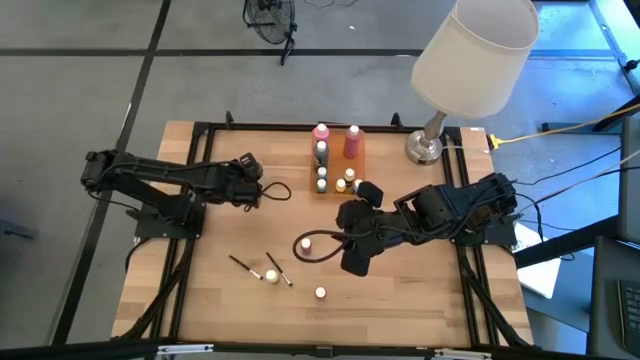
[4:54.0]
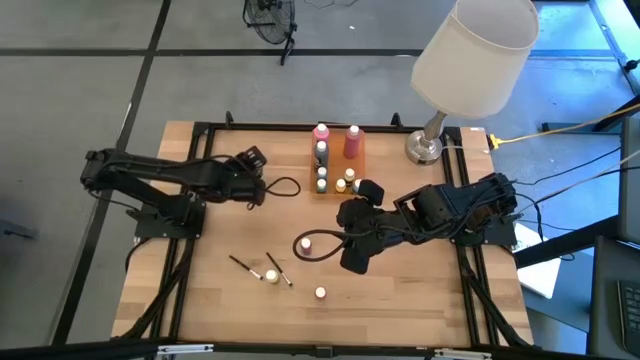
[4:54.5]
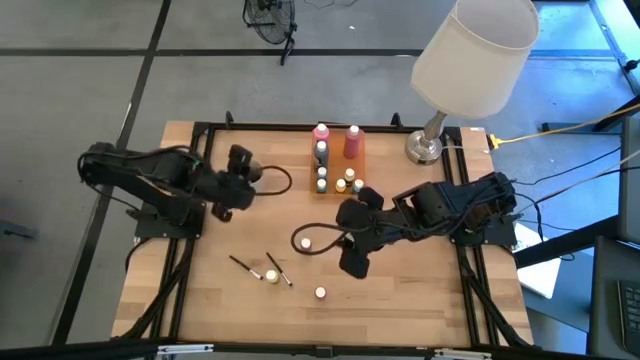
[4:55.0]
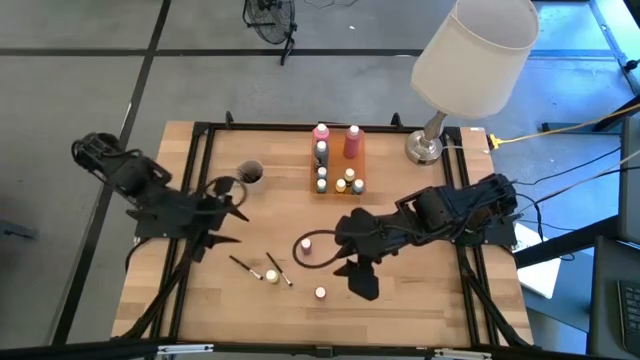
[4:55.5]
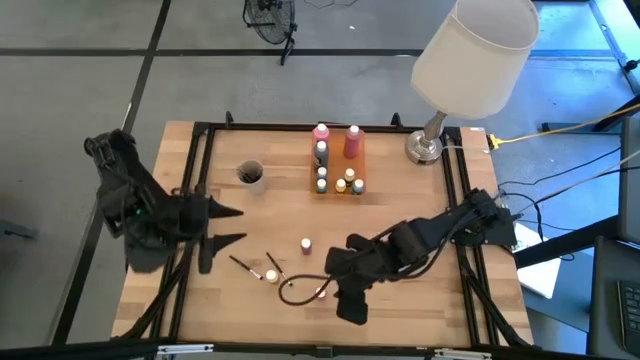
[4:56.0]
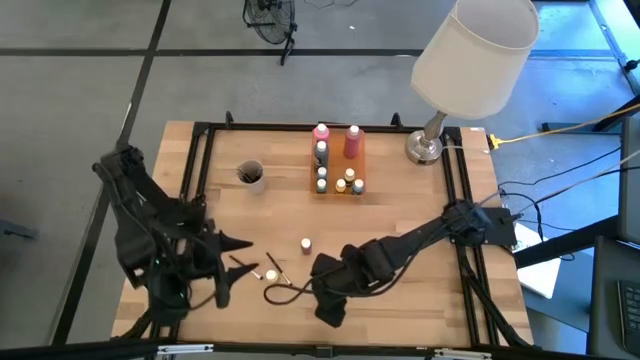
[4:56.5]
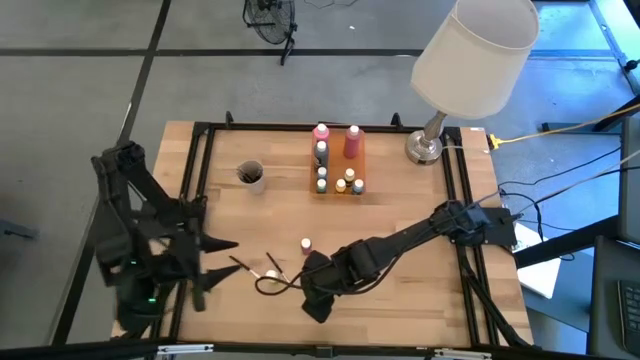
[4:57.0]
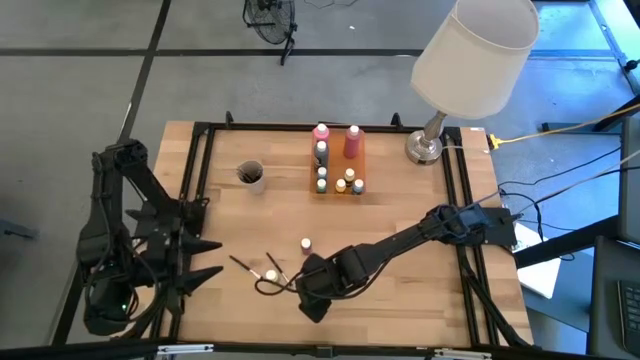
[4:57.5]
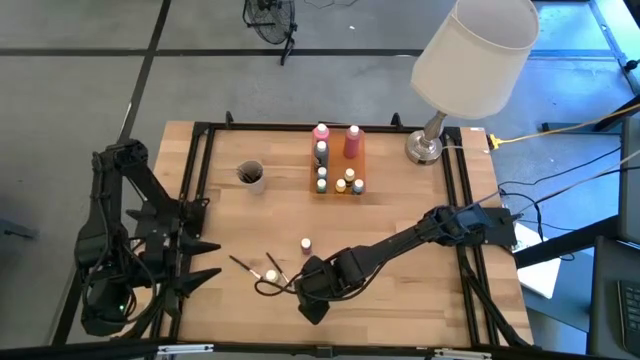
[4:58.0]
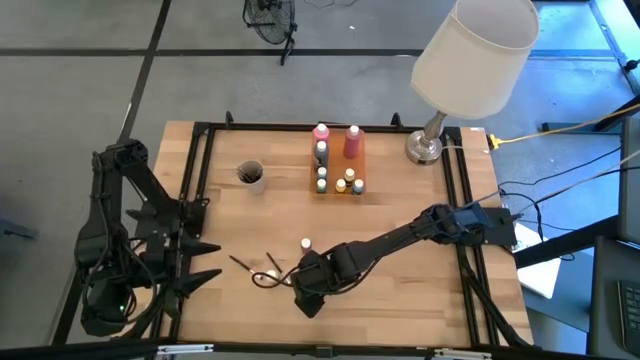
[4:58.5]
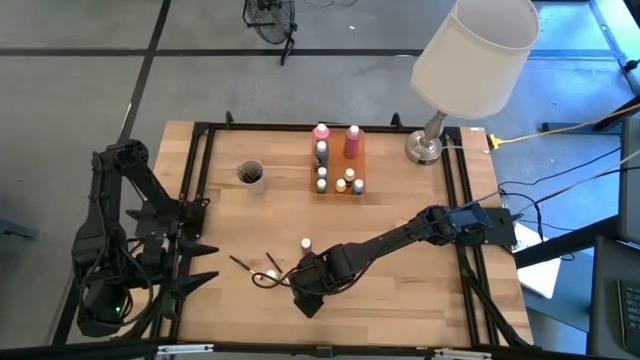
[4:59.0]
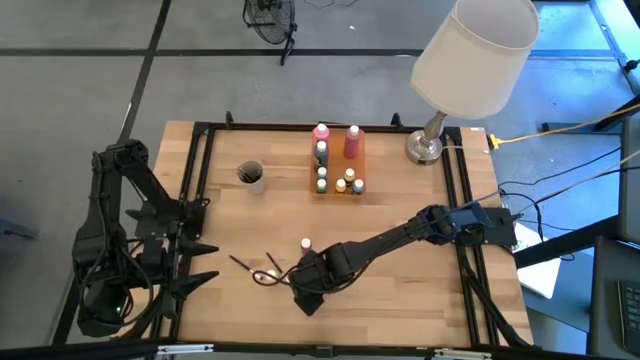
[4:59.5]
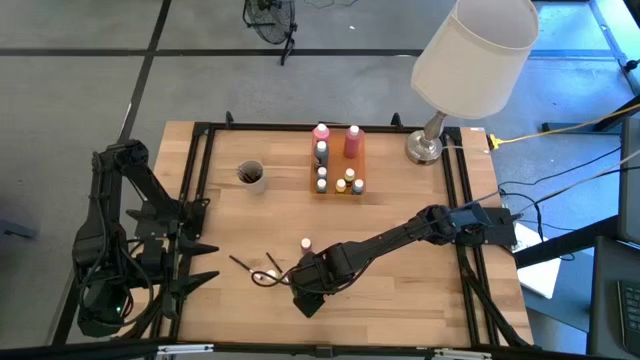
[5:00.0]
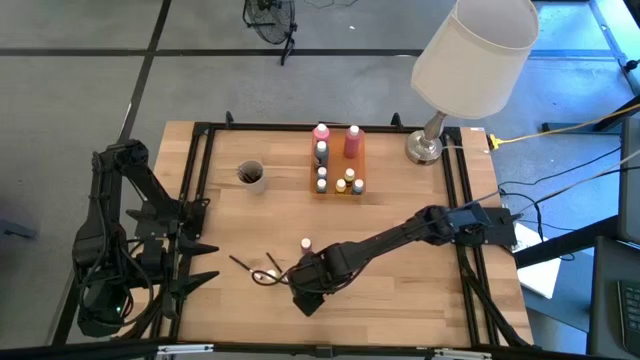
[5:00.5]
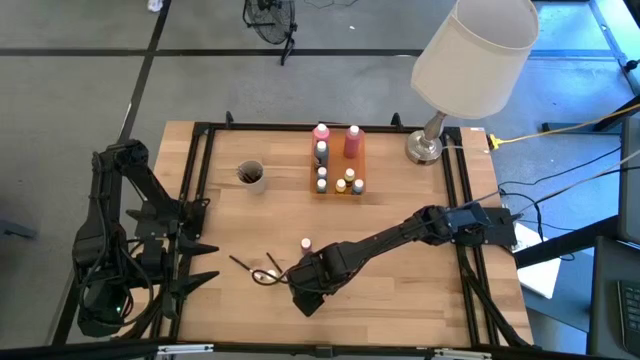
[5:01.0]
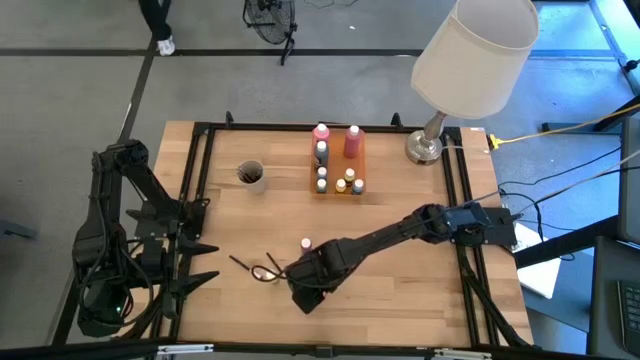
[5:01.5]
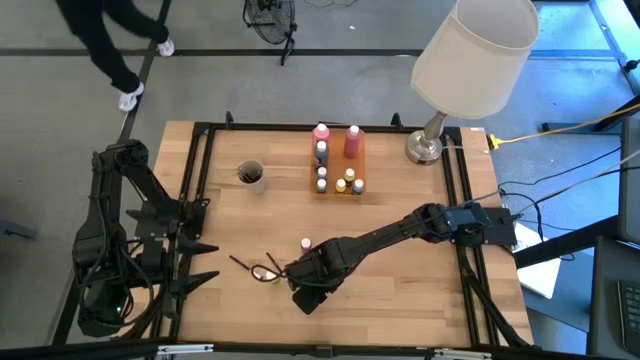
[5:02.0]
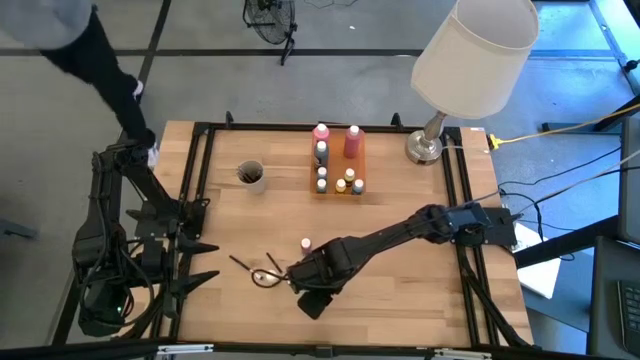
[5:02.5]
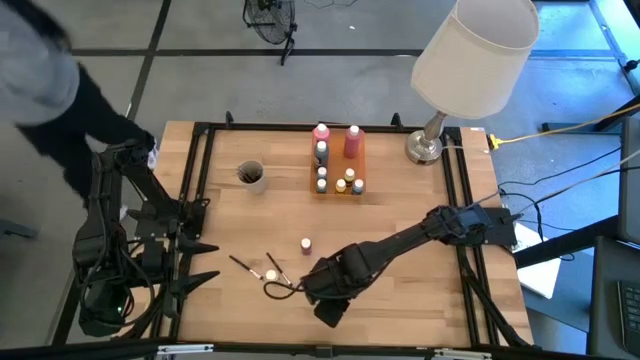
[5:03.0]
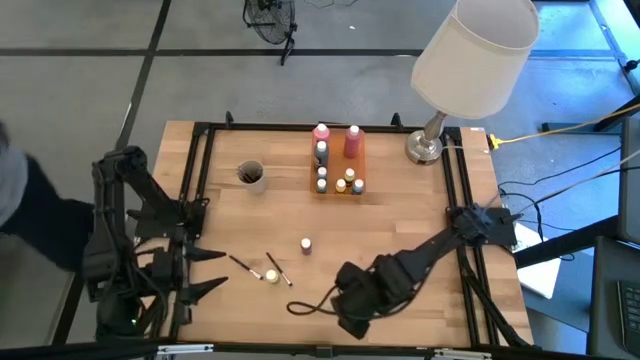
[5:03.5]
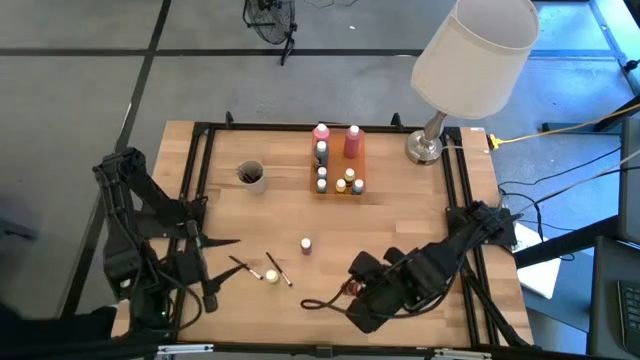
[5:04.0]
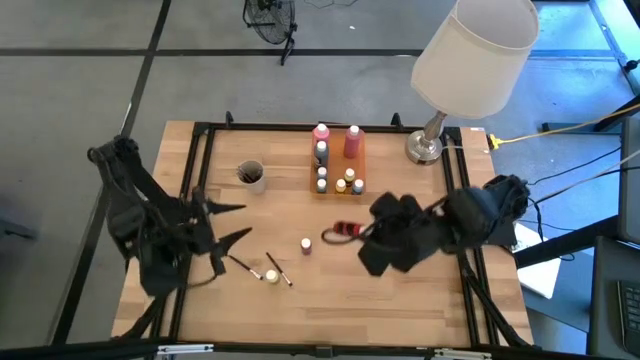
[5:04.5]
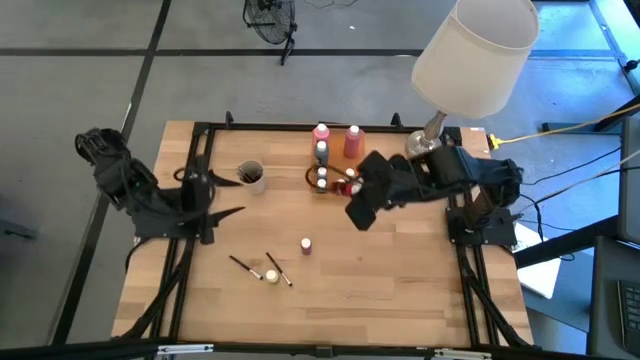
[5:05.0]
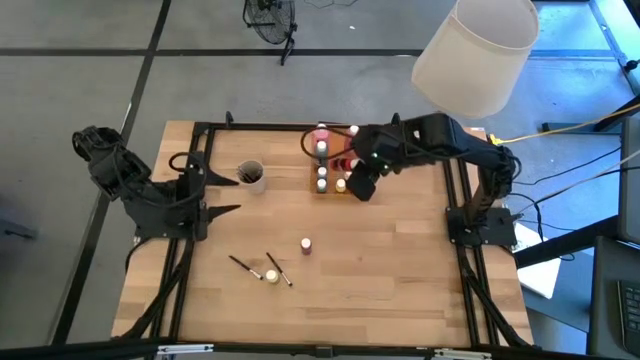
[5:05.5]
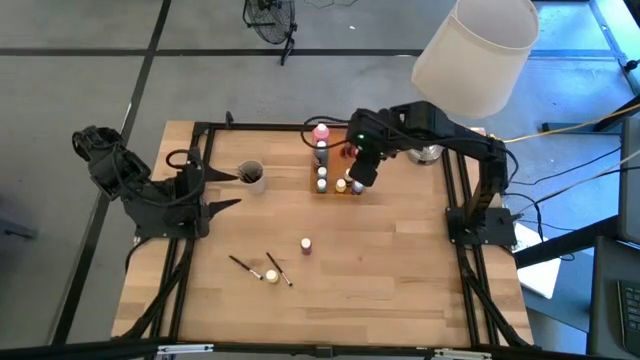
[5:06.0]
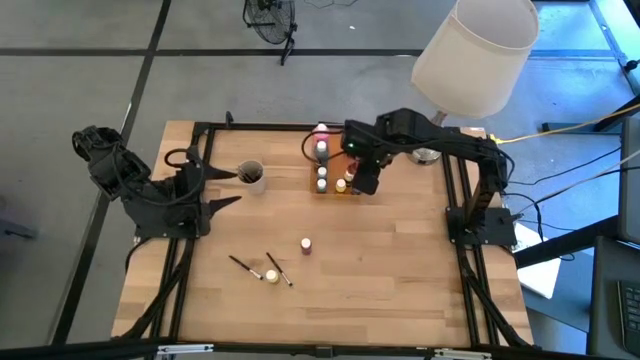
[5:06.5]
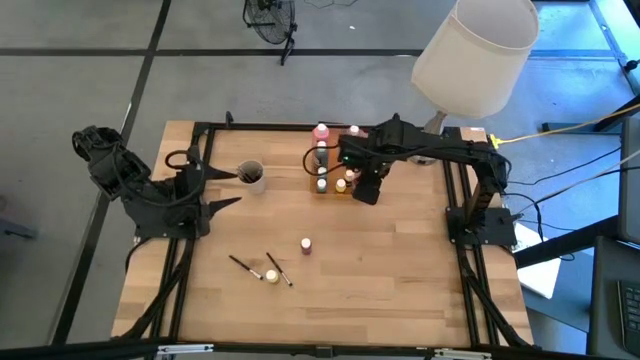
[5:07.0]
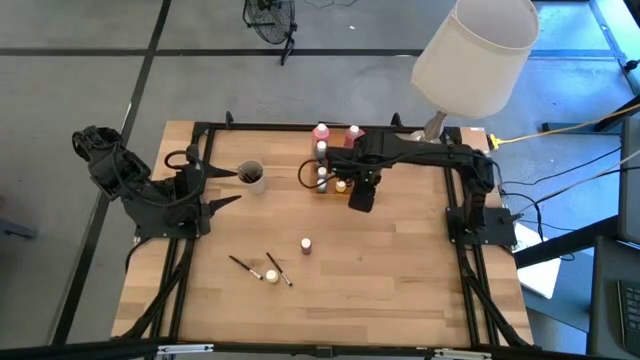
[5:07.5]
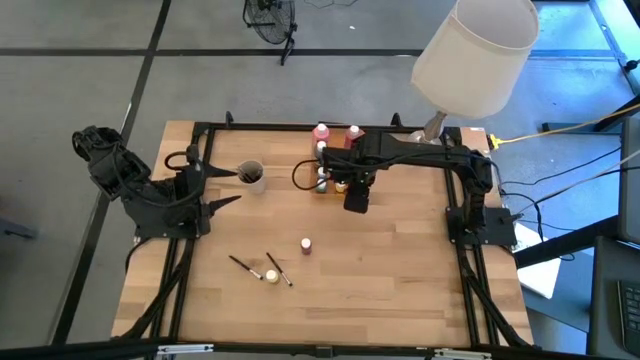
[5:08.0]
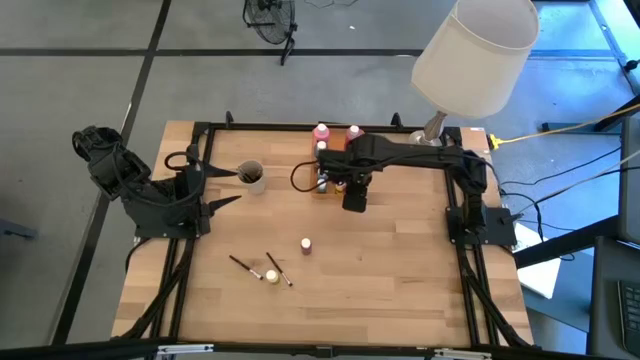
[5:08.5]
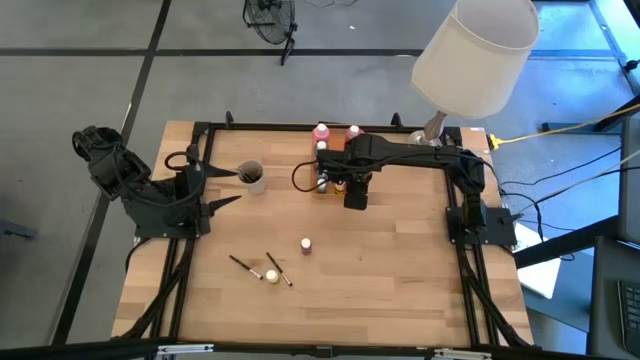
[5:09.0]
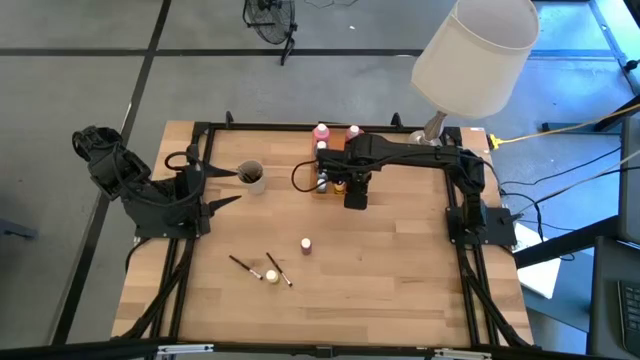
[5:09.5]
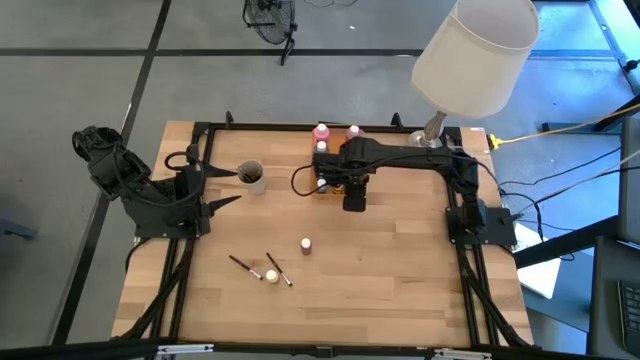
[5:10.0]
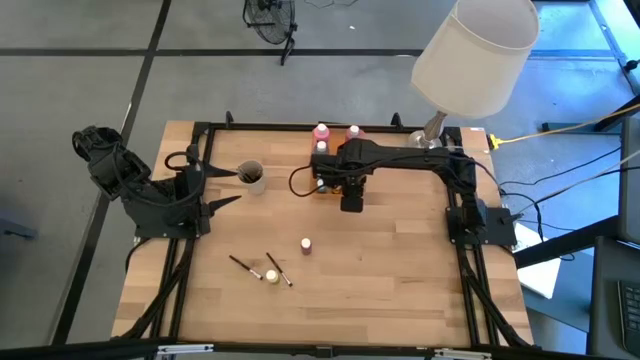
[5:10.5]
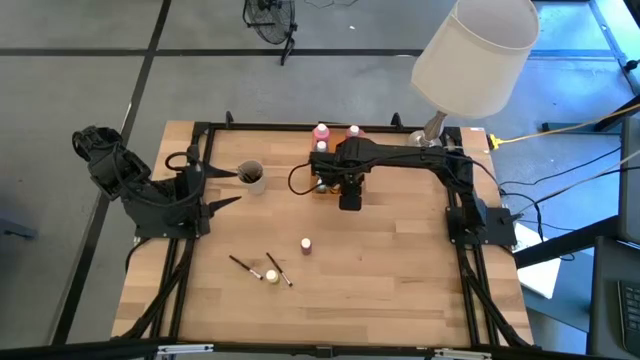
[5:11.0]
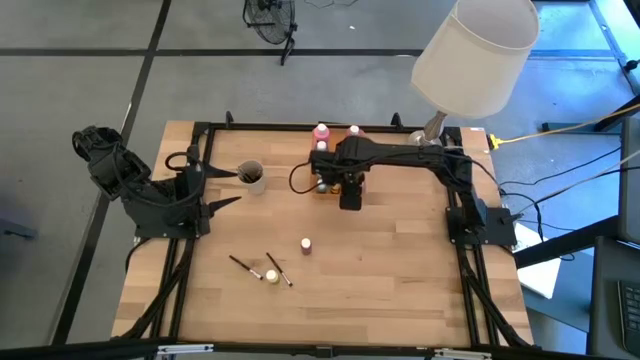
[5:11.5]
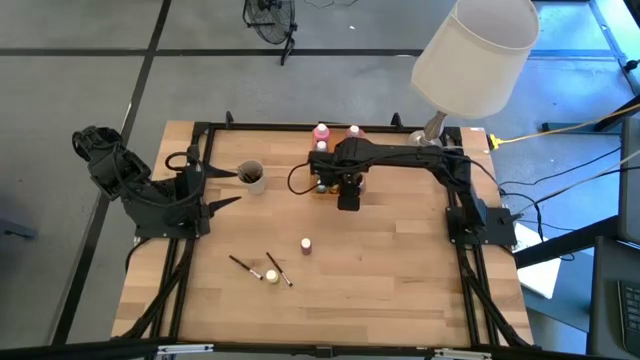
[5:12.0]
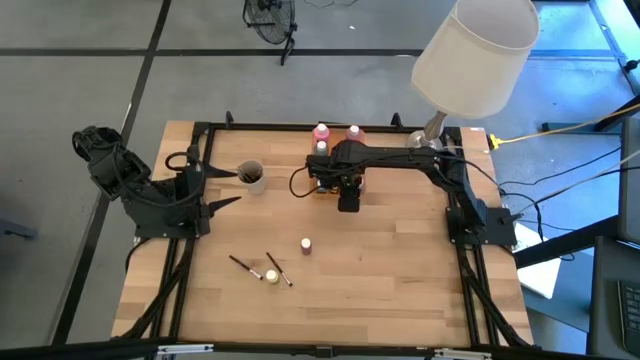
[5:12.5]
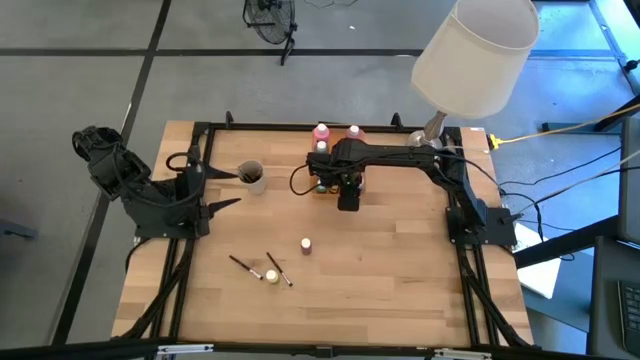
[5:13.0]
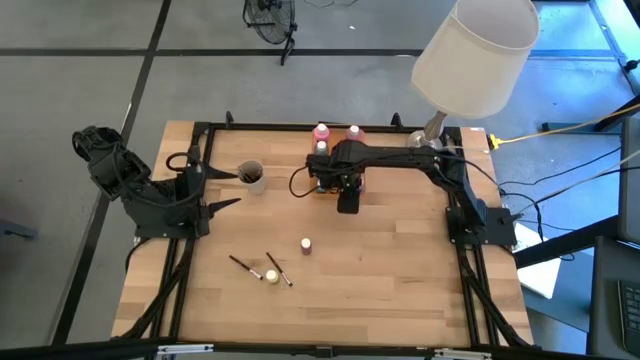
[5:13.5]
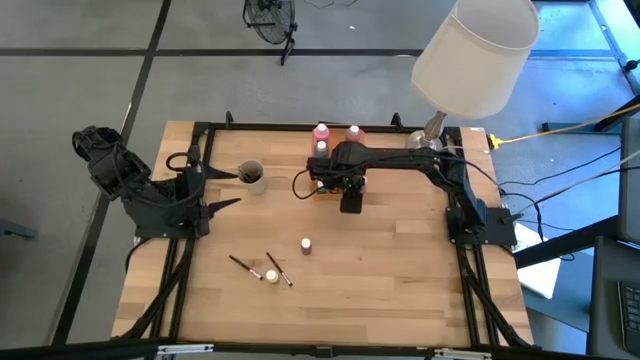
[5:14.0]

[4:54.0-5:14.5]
Task: Pick & Place Paint Supplies
Put the small red paint bottle into the orange bin
